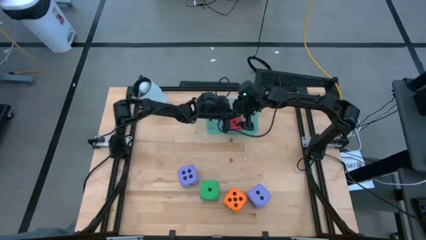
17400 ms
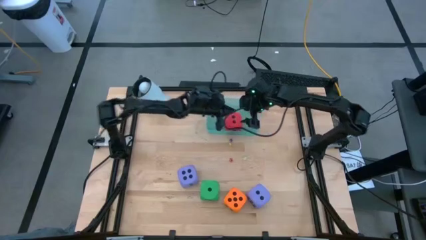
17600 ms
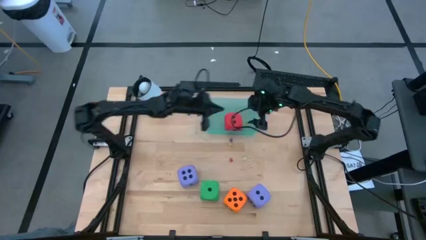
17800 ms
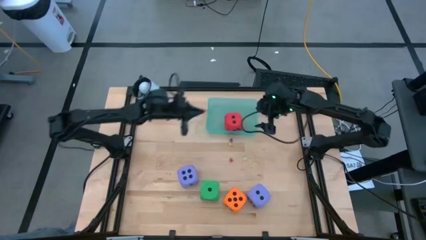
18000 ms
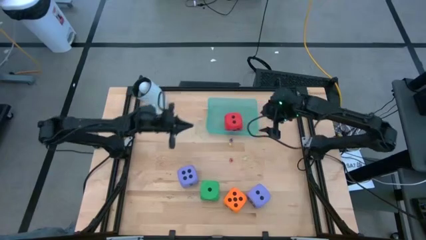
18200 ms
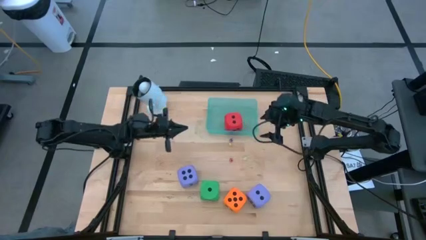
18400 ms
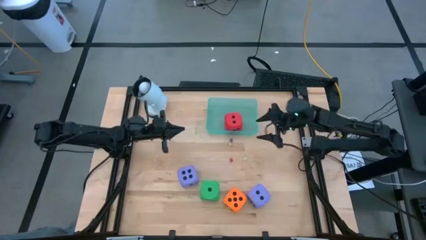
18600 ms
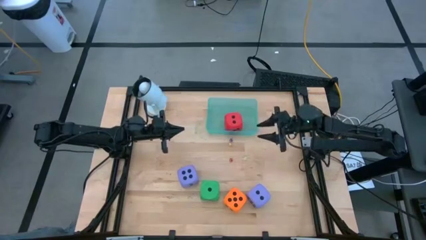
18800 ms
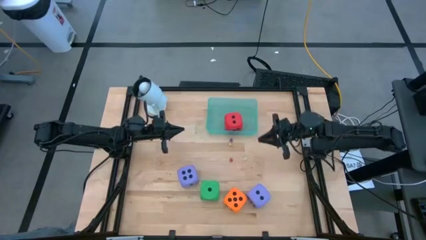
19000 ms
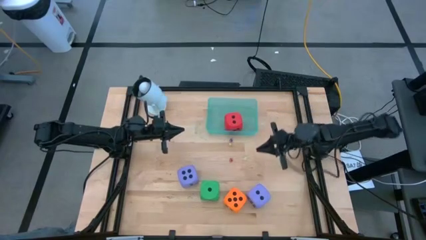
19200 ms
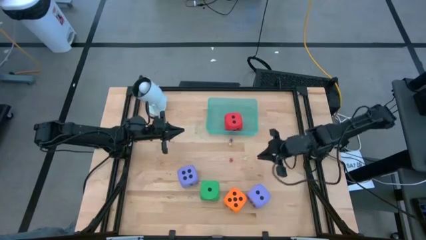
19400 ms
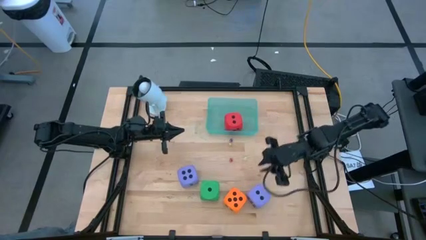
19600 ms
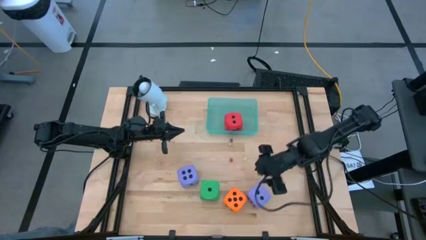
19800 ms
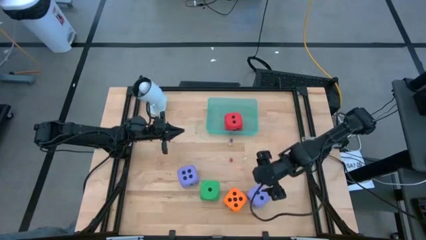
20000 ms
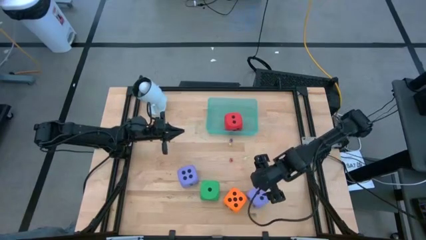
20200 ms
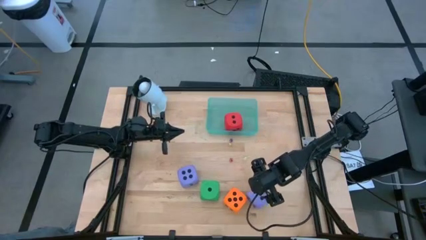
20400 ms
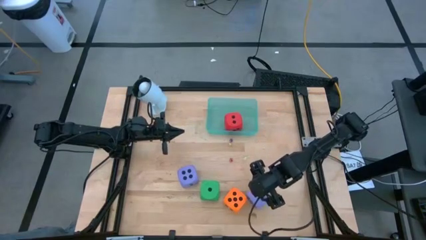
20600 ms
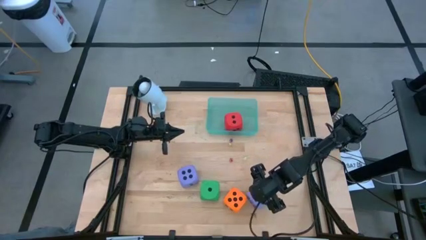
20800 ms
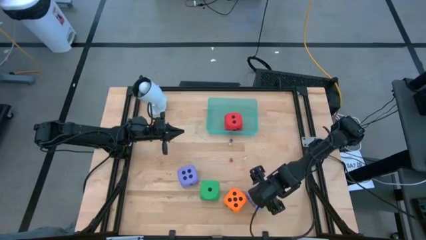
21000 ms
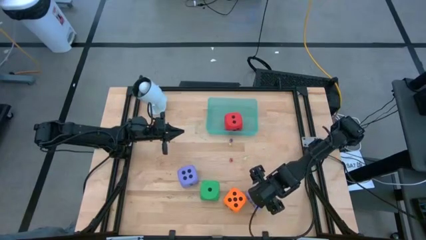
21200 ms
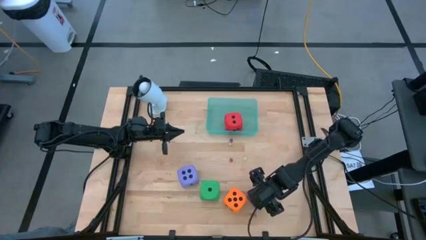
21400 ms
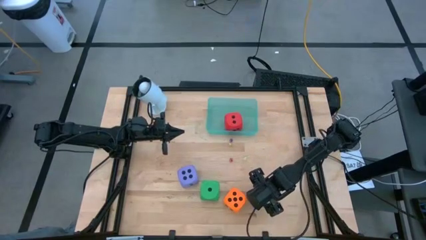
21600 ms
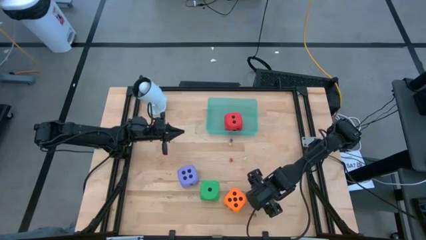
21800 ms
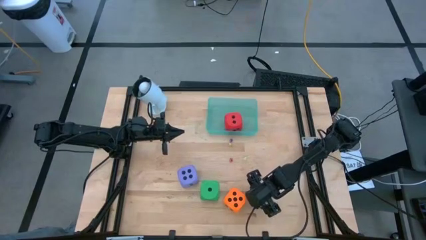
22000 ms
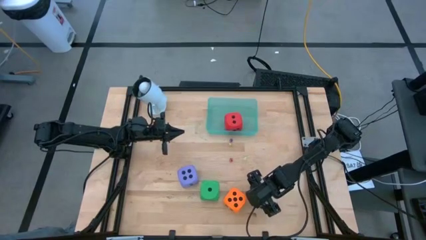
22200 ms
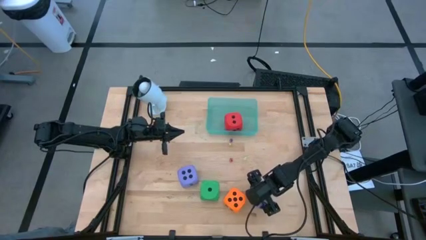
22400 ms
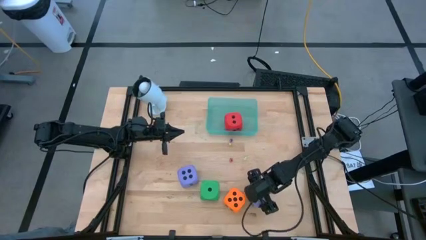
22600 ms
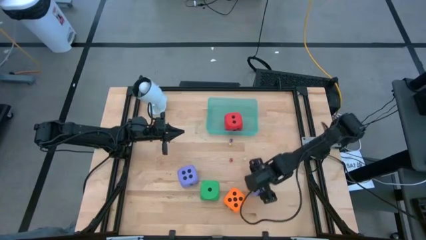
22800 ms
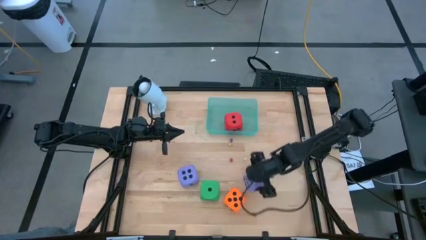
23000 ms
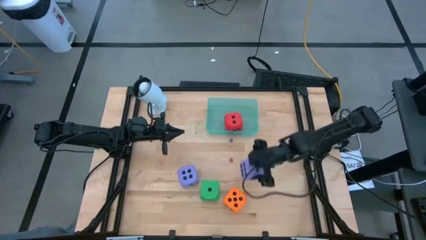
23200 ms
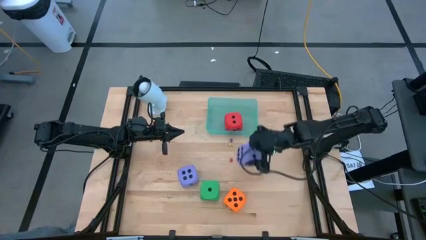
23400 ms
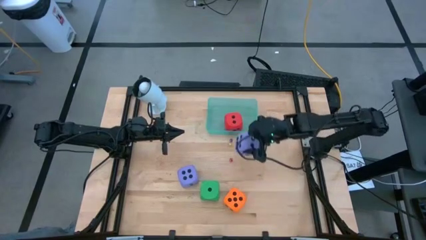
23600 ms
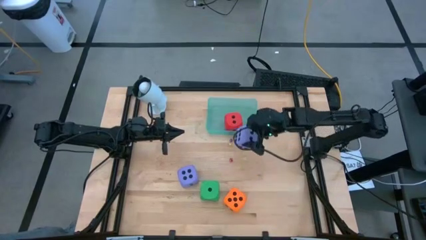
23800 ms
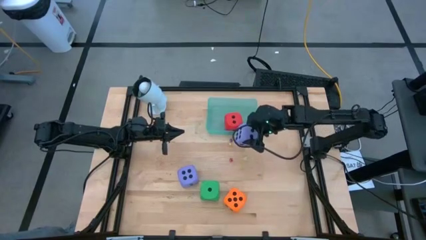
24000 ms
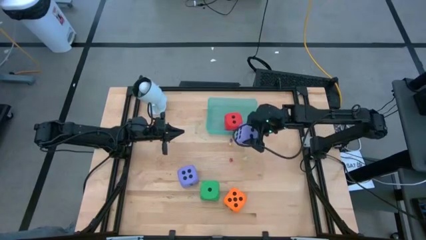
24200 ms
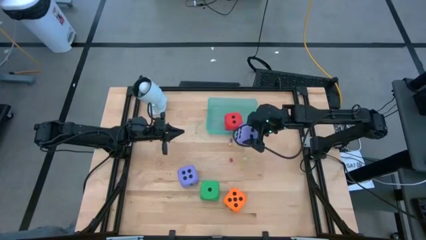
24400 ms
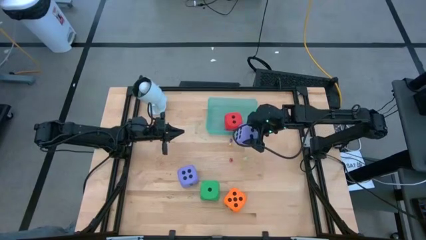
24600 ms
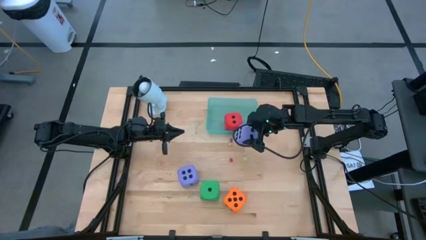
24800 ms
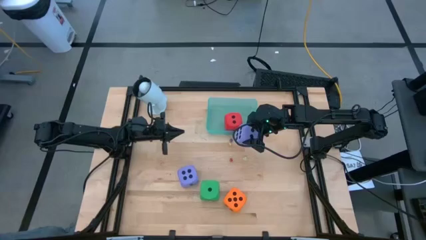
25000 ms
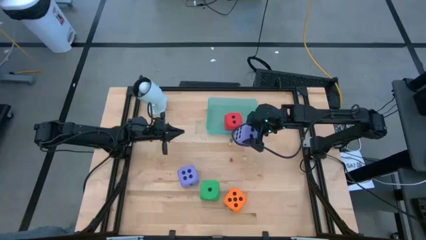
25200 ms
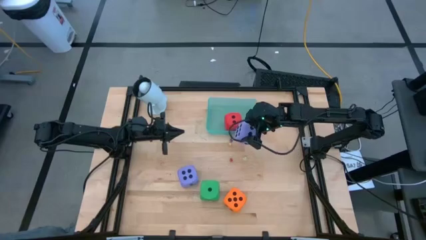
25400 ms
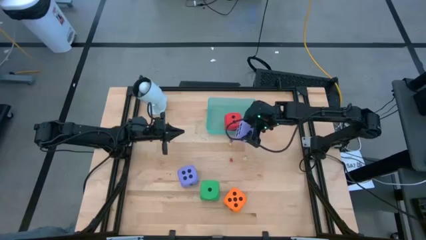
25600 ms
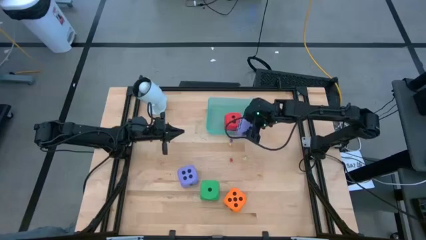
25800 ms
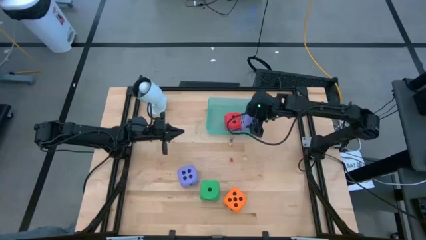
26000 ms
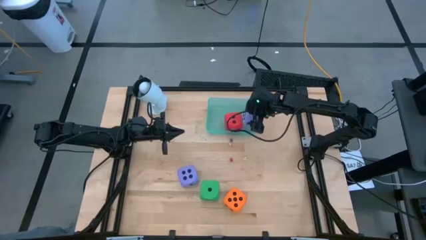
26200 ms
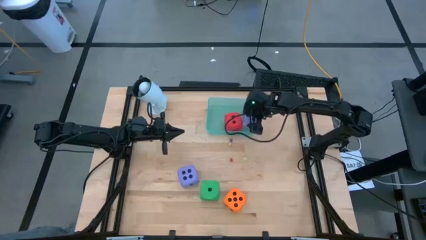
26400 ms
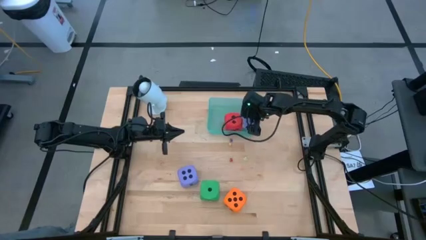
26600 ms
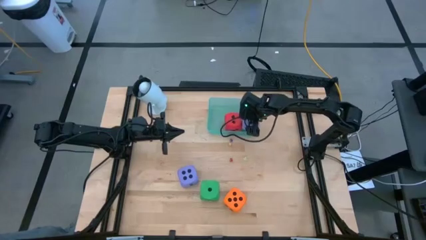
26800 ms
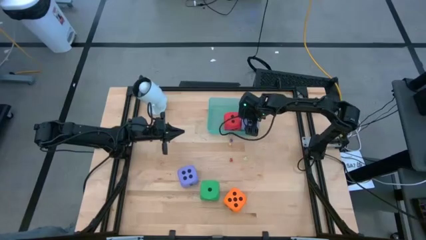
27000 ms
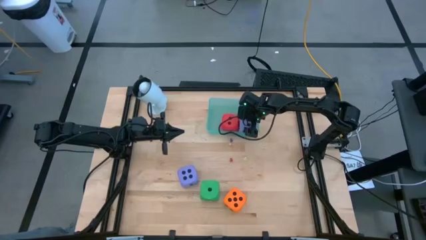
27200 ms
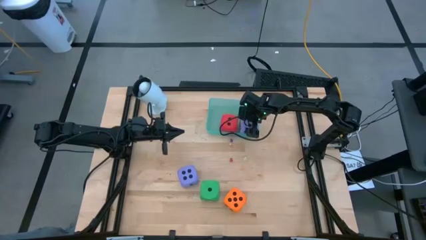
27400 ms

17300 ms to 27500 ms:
Task: Pick & Place Dice
Put the right large purple die into the blue bin

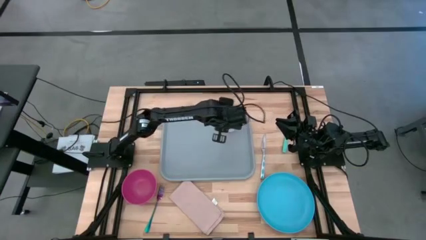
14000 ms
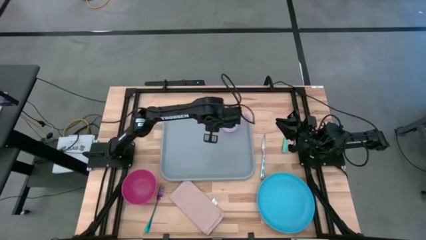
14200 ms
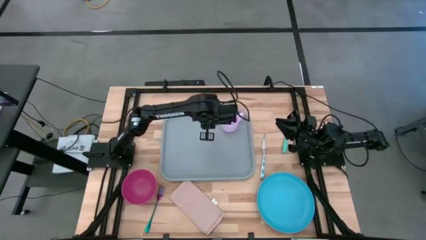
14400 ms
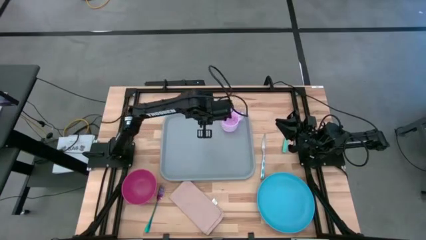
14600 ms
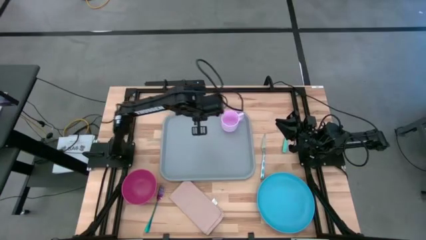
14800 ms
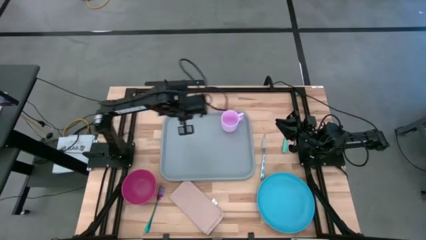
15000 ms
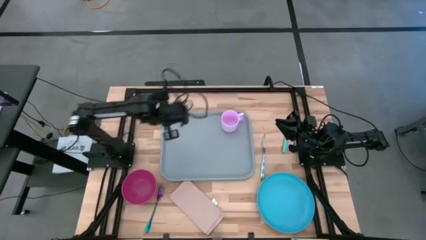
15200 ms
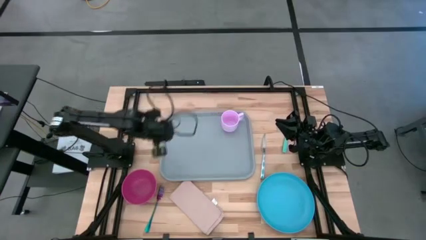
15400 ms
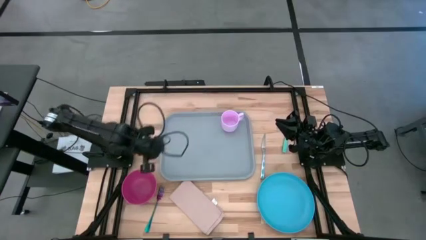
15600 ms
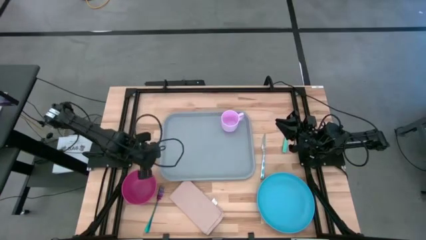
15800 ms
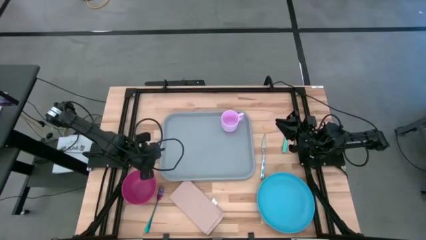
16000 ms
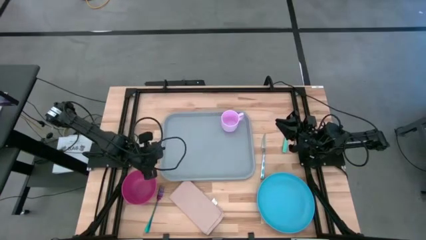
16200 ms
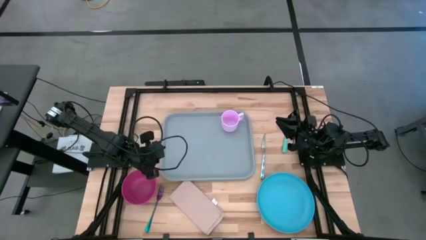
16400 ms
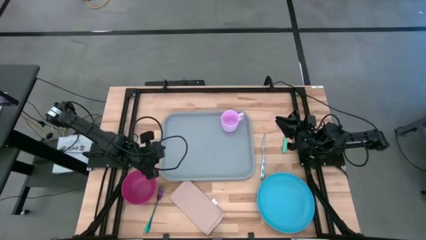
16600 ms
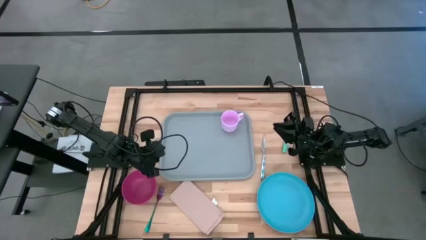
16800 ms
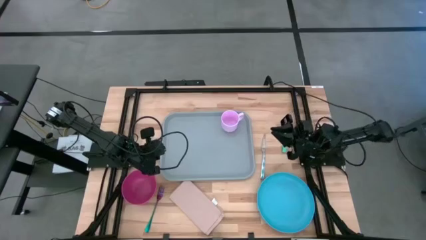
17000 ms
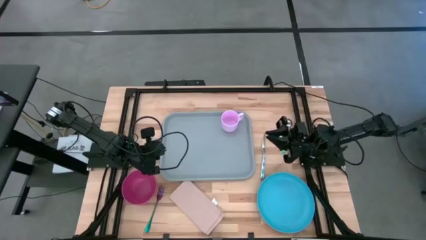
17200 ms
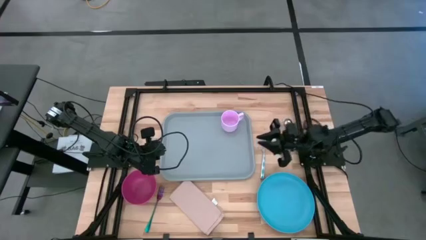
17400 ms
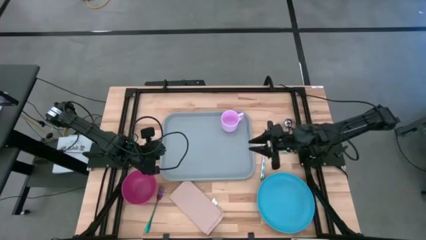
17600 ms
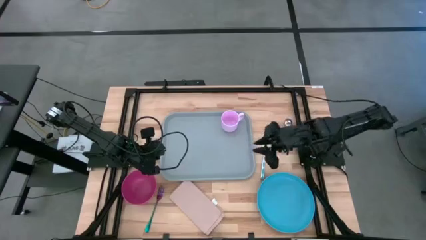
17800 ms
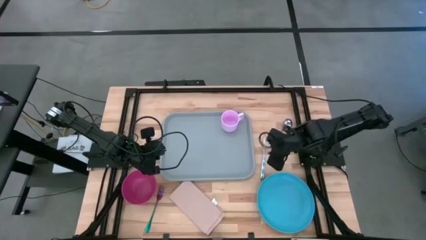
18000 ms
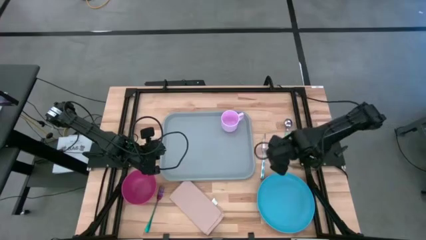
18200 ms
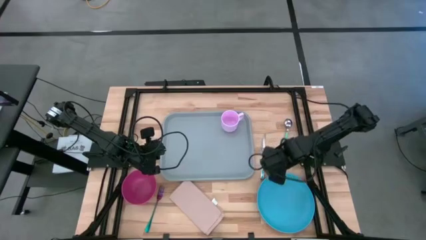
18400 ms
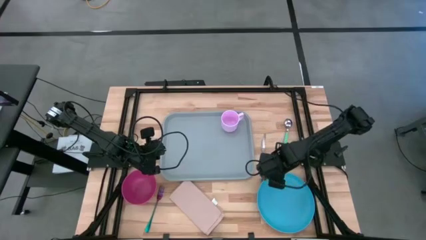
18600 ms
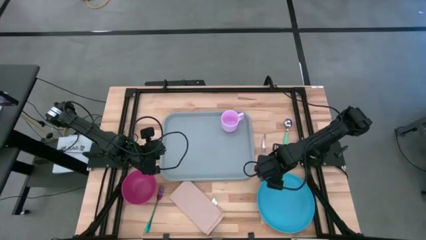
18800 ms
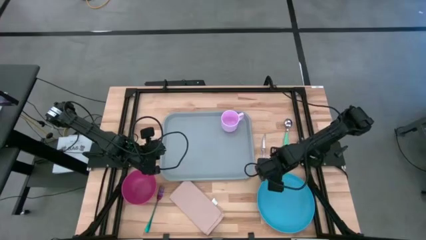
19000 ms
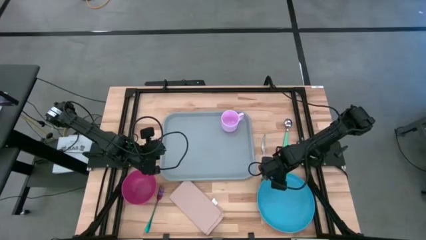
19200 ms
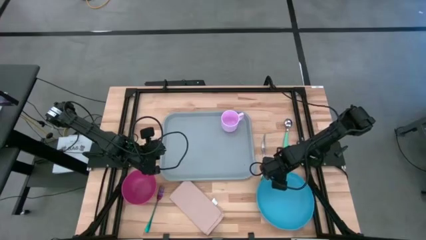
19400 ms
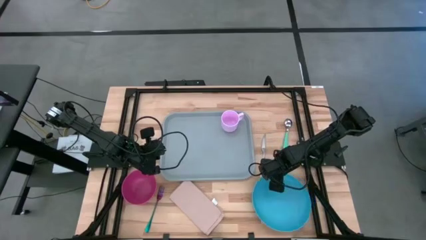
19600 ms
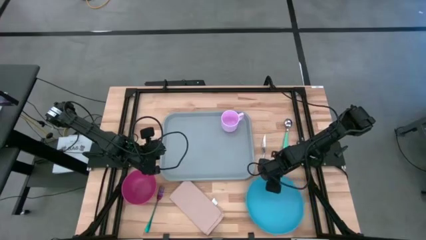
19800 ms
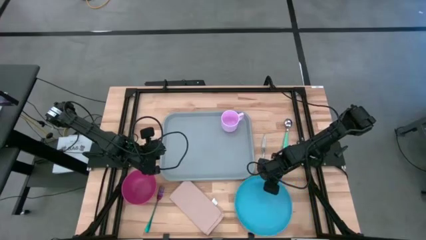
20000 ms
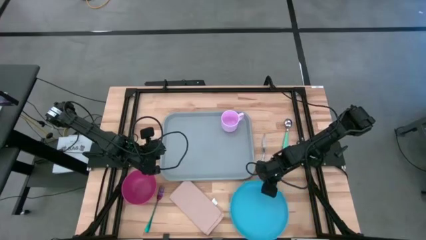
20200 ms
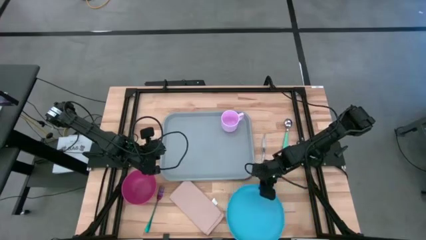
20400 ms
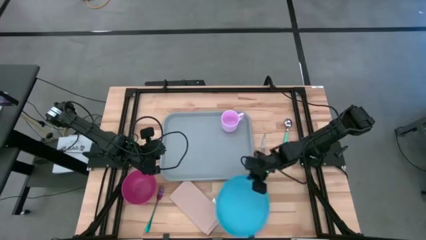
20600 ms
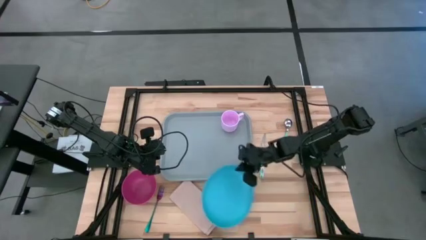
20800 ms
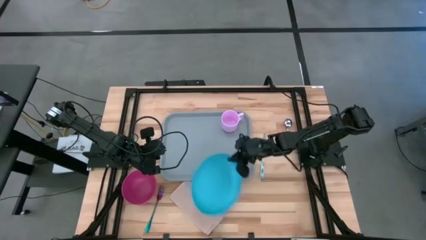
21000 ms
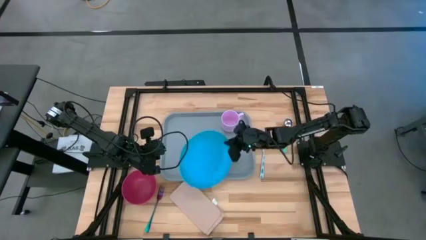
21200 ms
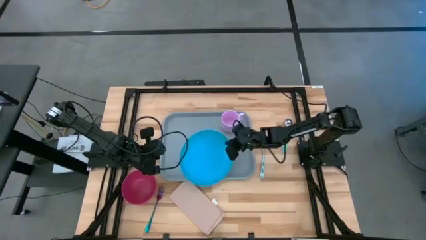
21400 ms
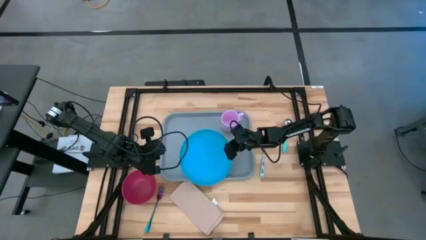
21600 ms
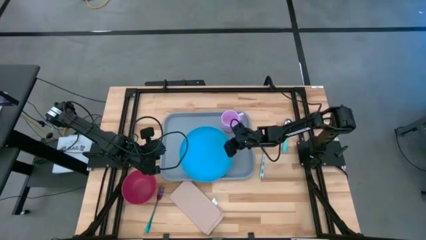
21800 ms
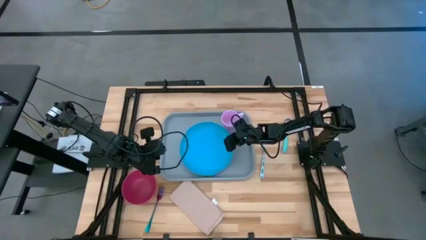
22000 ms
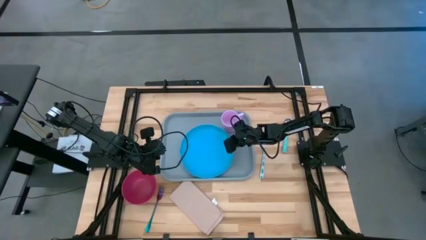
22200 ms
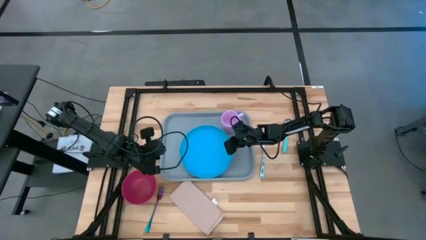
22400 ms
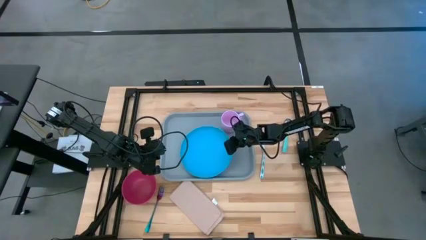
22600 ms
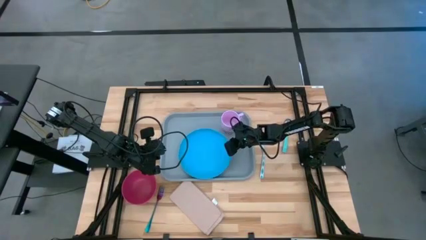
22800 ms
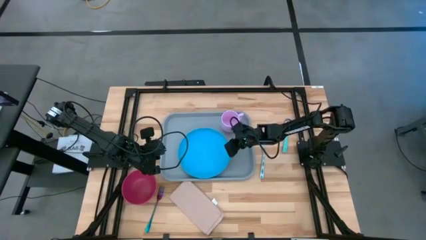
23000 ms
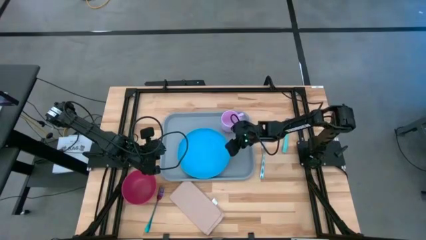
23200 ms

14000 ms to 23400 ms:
Task: Set up tray
Put the blue plate on the gray tray to the bottom left of the pink mug
